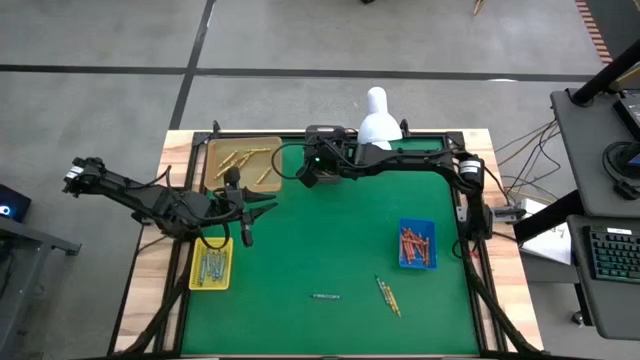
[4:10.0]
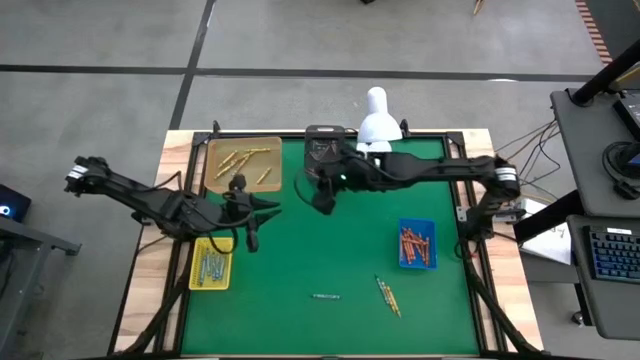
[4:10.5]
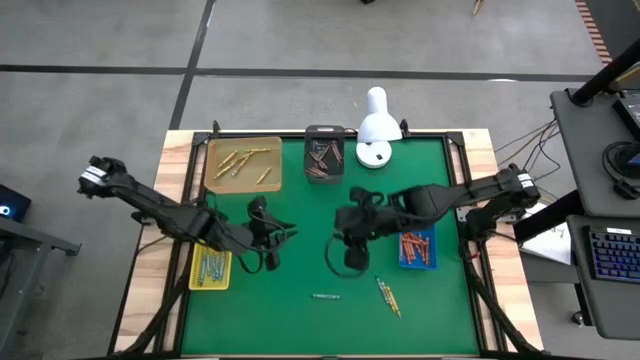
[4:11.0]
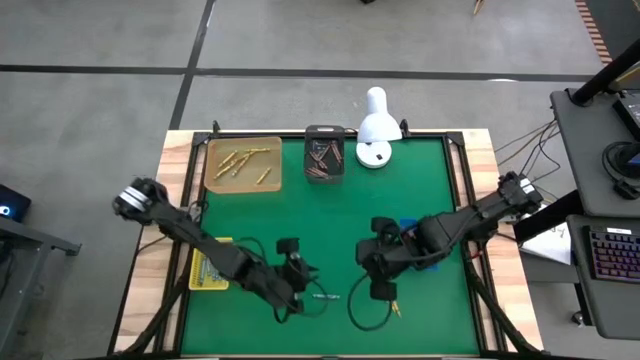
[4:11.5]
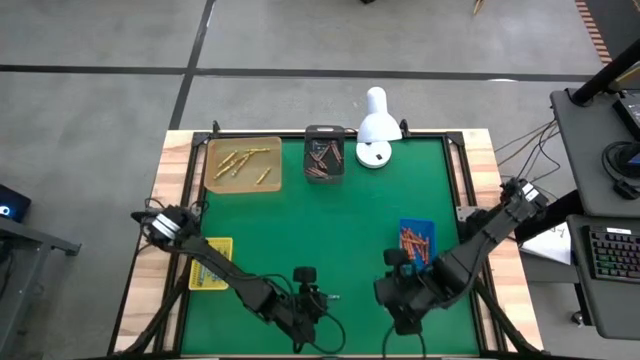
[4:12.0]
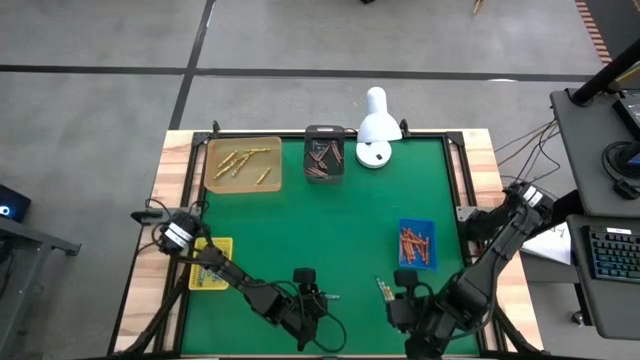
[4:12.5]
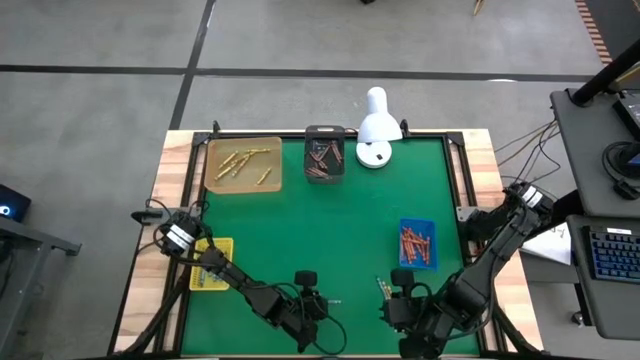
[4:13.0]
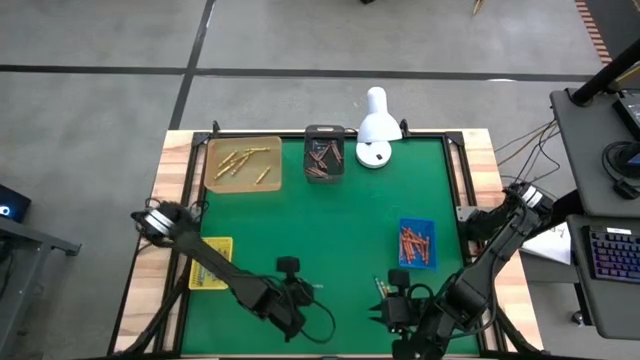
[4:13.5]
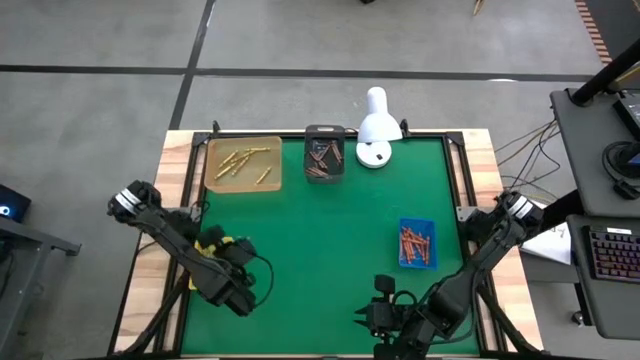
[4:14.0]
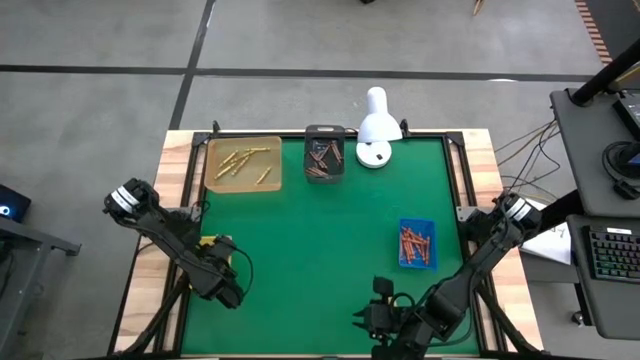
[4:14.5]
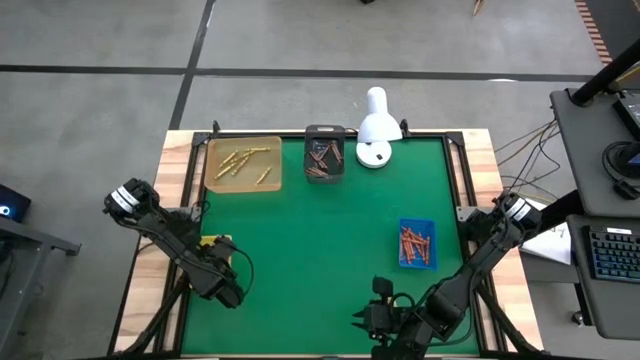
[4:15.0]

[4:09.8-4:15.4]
Task: Sort crayons
Put the blue crayon into the yellow bin

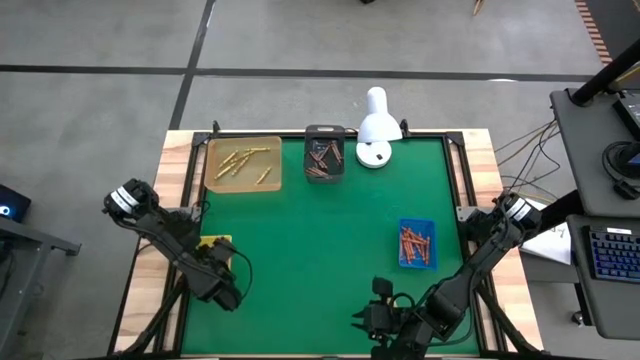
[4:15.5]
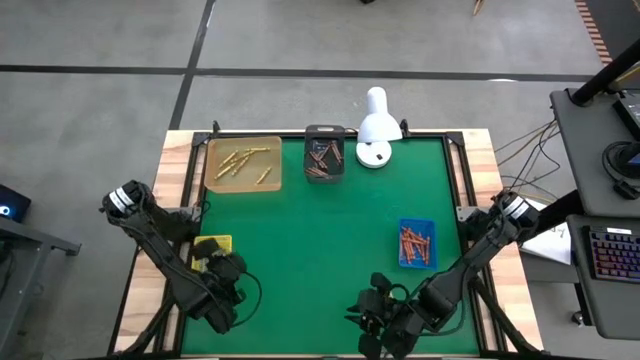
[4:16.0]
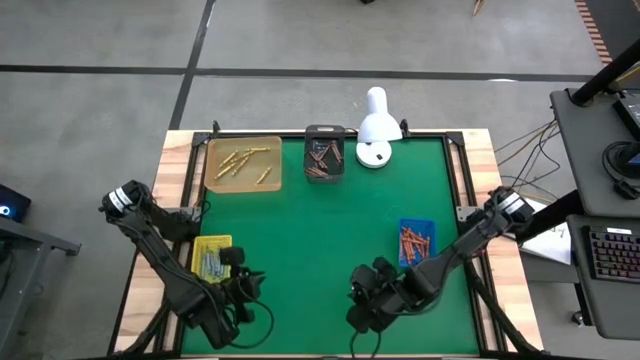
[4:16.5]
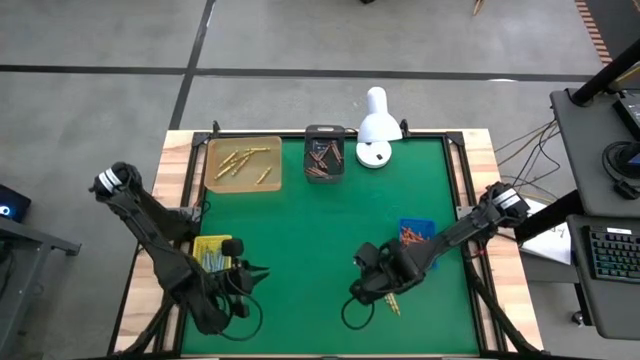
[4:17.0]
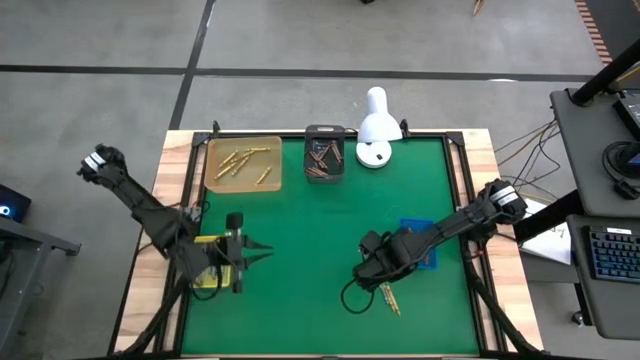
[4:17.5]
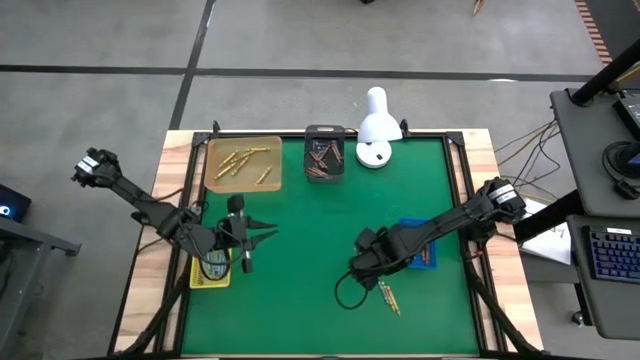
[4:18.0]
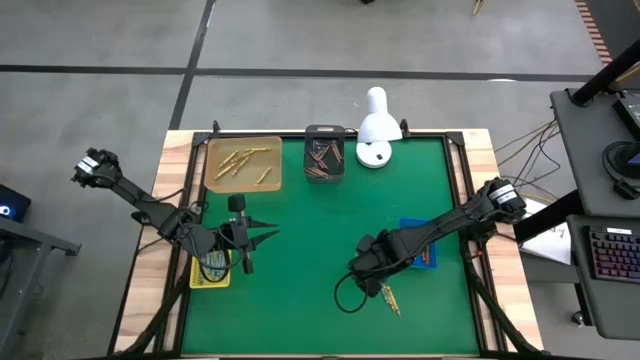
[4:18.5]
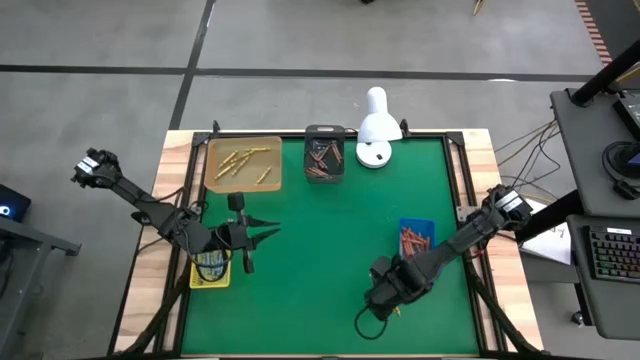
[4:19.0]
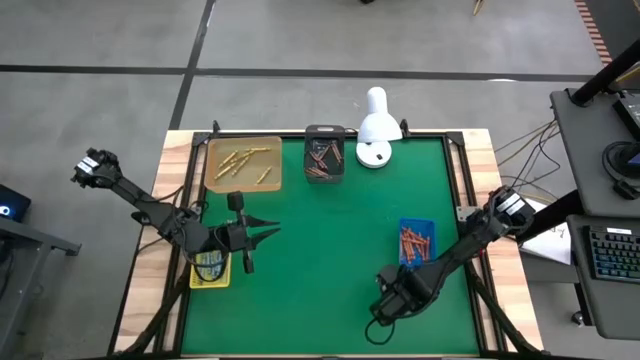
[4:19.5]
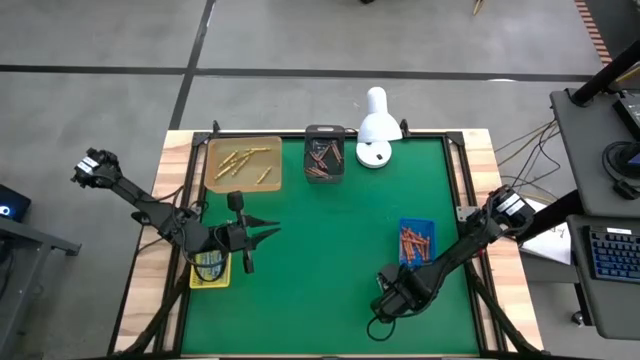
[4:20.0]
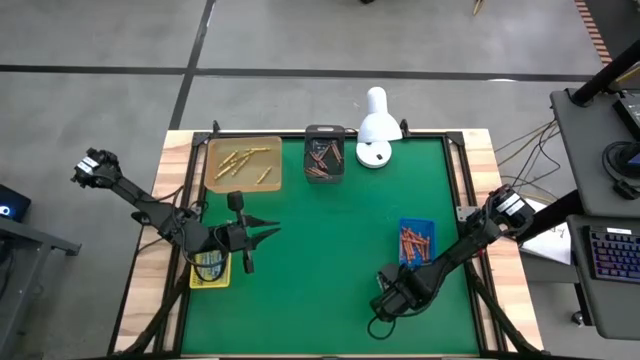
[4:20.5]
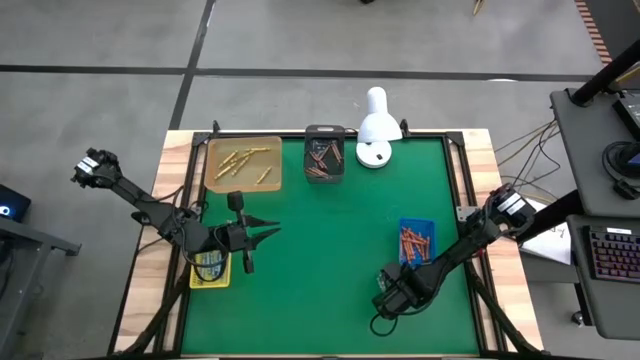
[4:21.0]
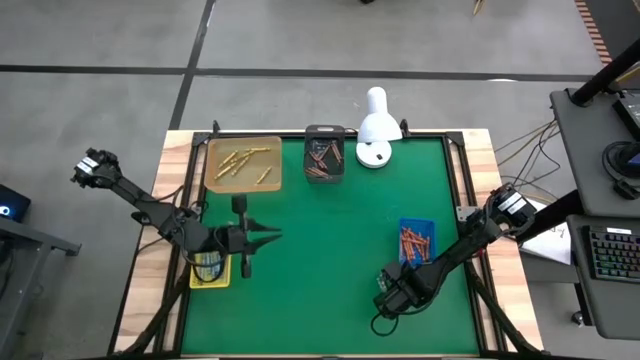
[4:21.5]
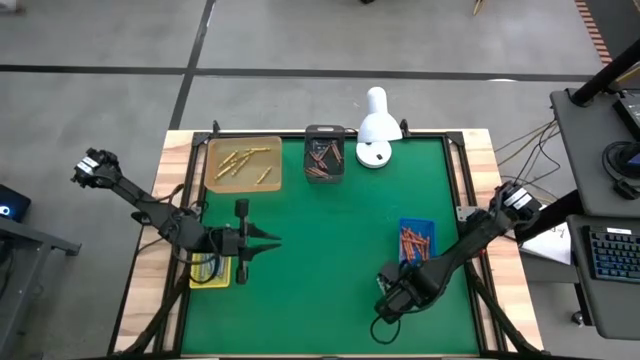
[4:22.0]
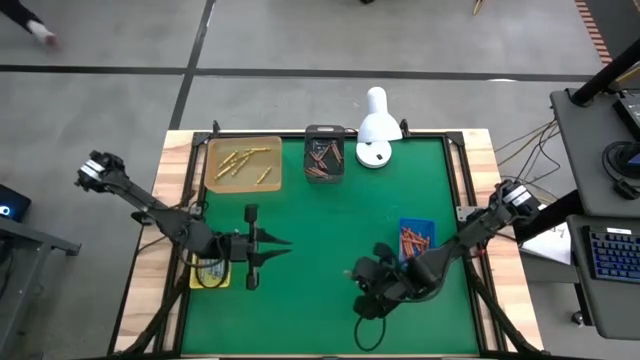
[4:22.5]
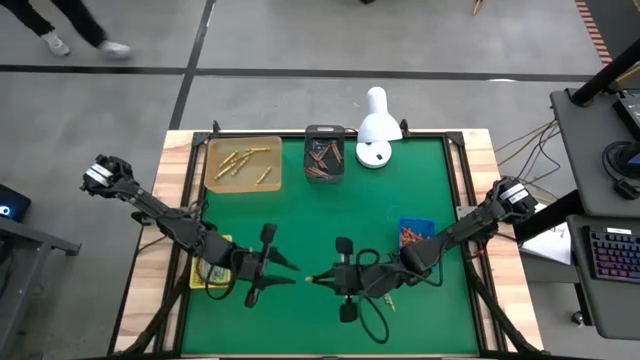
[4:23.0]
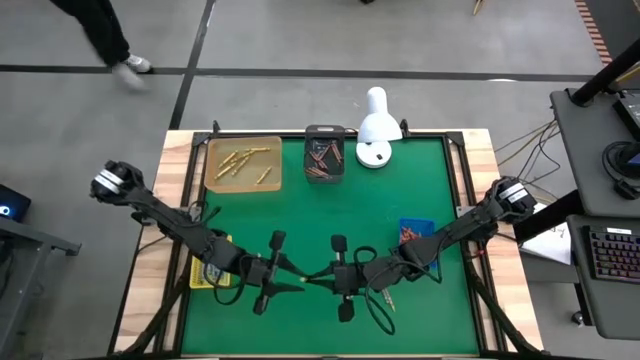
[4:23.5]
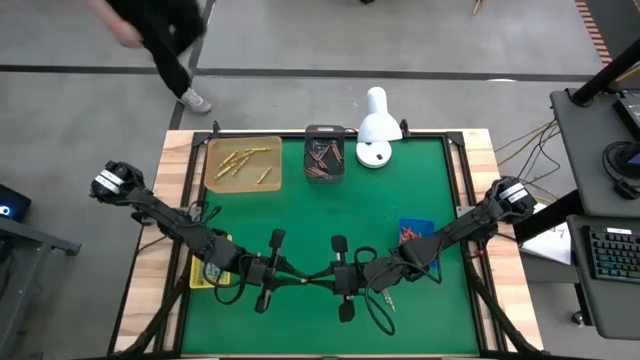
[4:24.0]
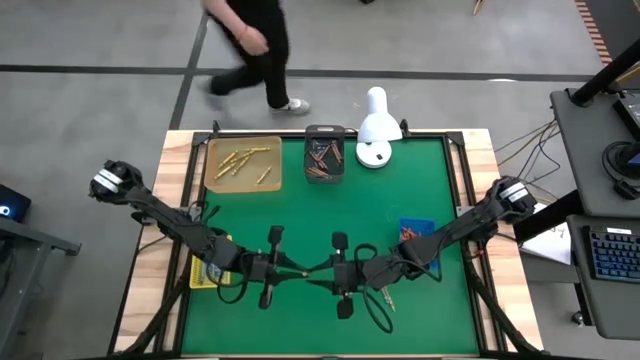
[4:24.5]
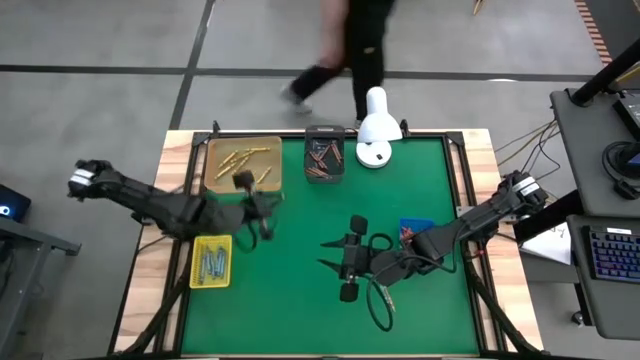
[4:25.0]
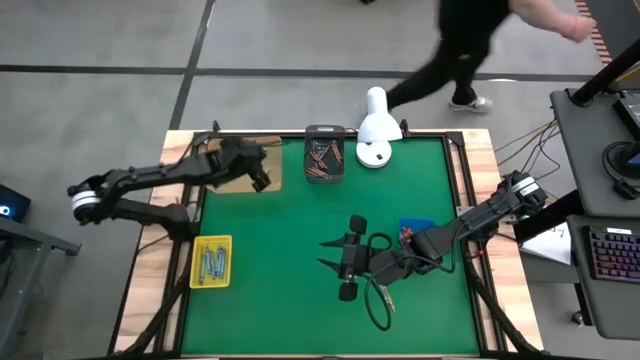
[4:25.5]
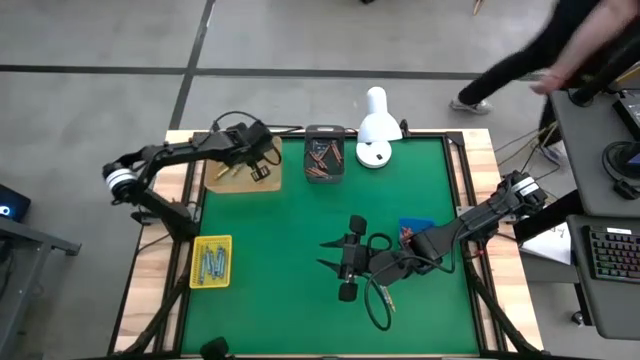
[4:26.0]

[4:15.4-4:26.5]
Put the green crayon into the orange bin

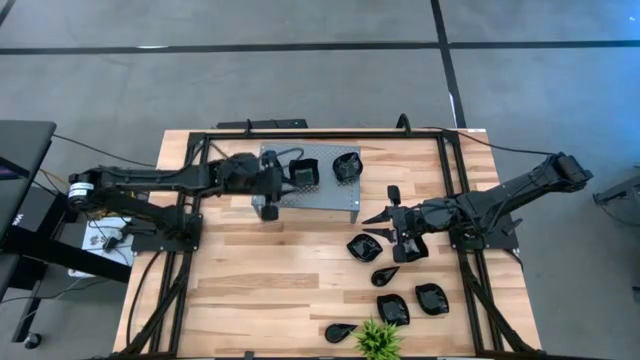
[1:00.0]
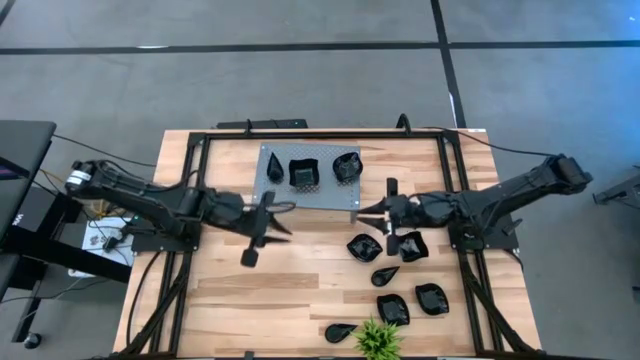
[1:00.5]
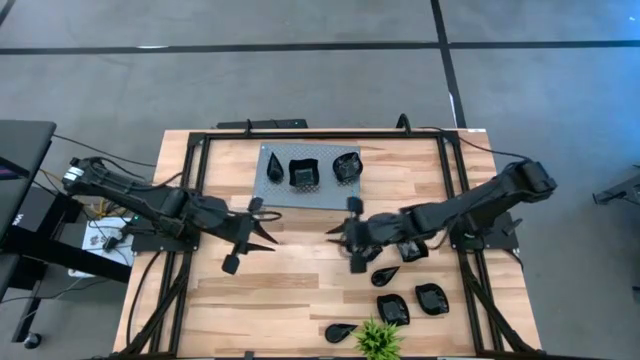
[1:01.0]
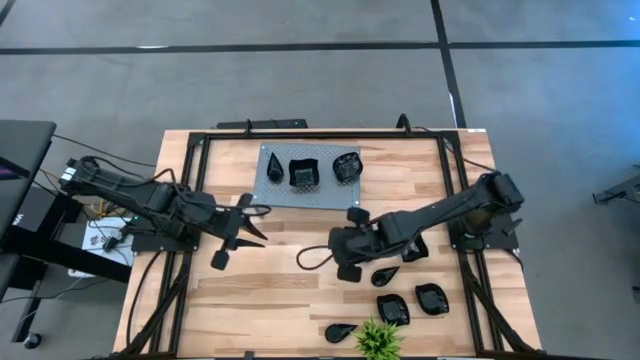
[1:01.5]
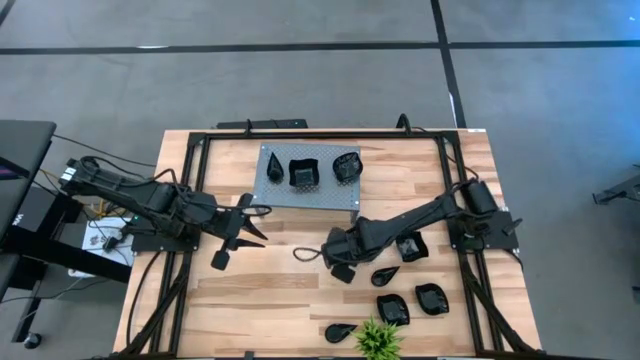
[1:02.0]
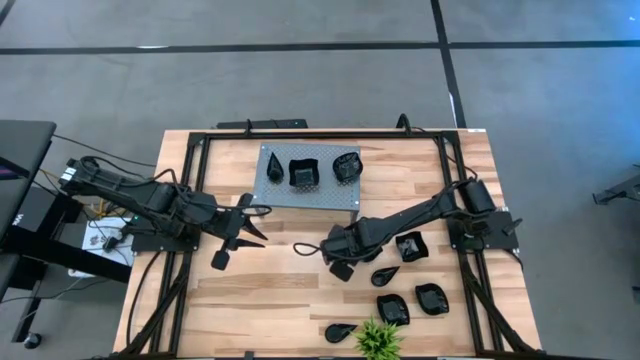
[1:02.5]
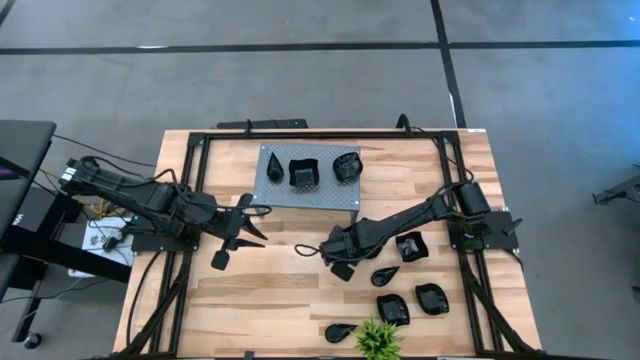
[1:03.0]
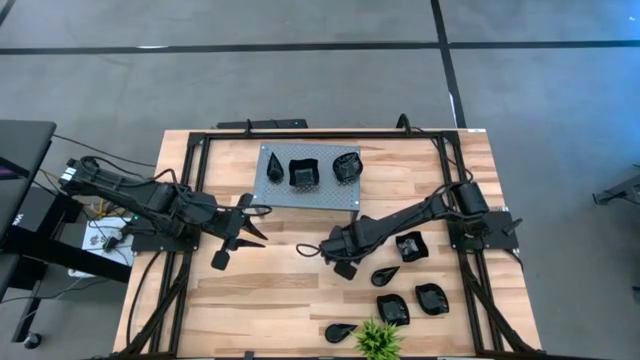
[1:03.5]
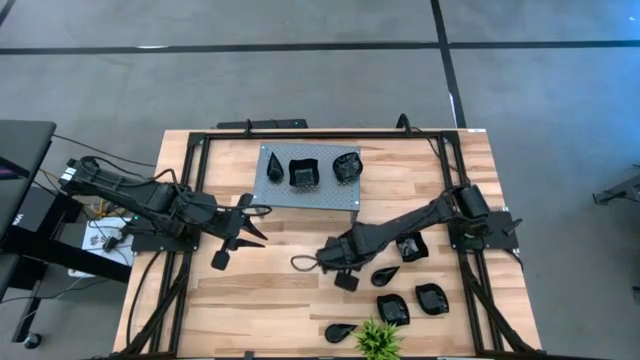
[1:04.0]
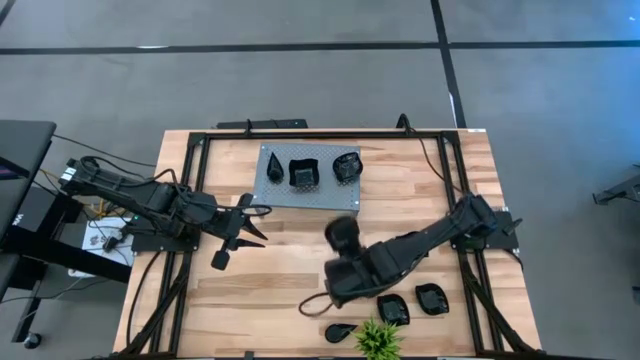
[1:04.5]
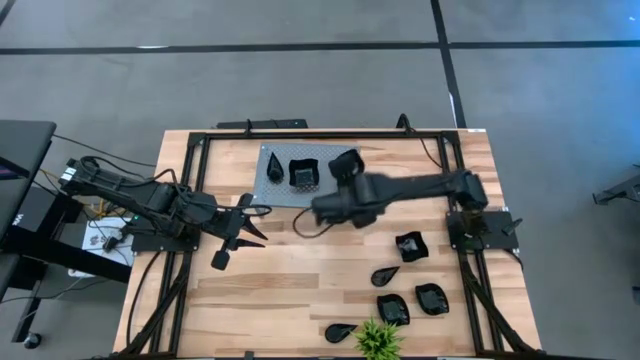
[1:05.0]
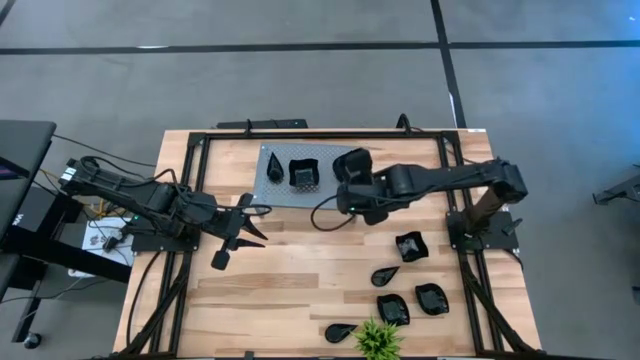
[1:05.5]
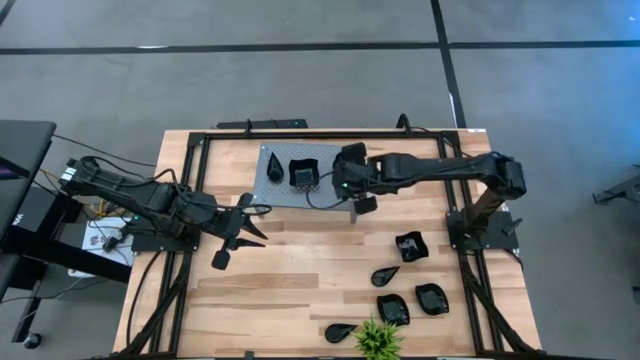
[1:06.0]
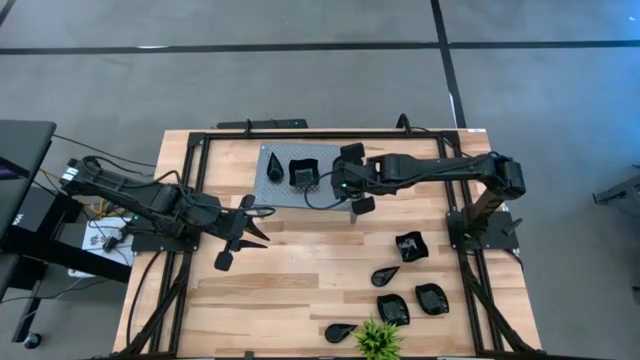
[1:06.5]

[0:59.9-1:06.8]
Task: Pick & Place Mini shaped plates
Stack the black leaf-shaped plate on top of the black leaf-shaped plate on the shelf
